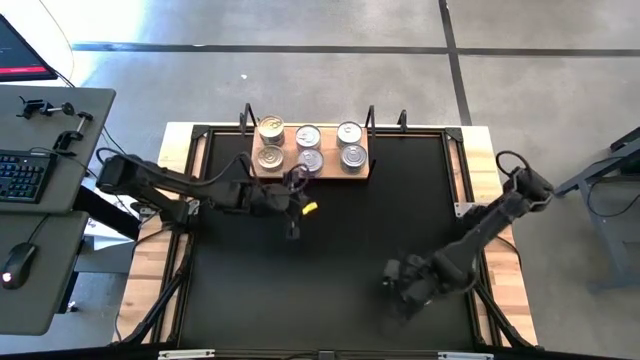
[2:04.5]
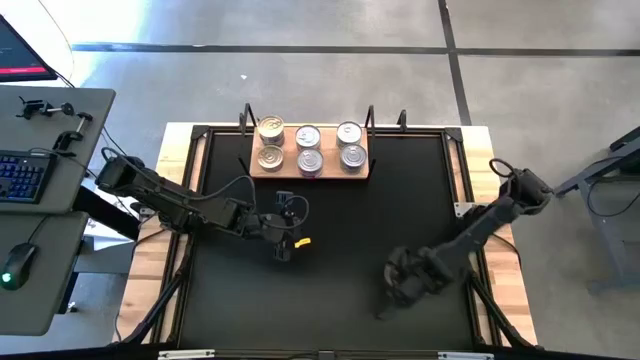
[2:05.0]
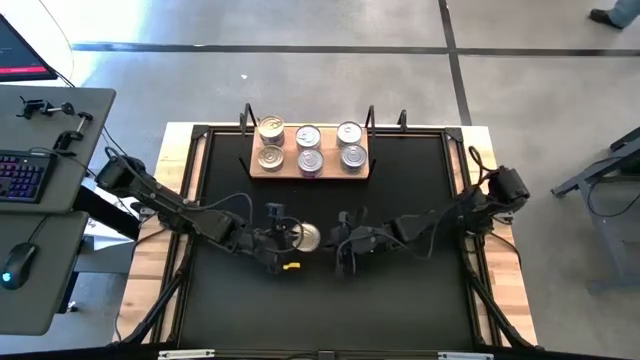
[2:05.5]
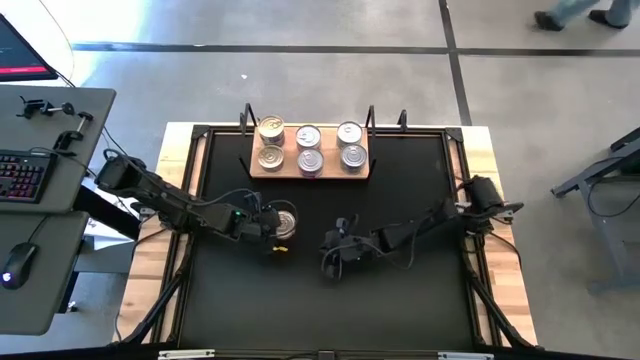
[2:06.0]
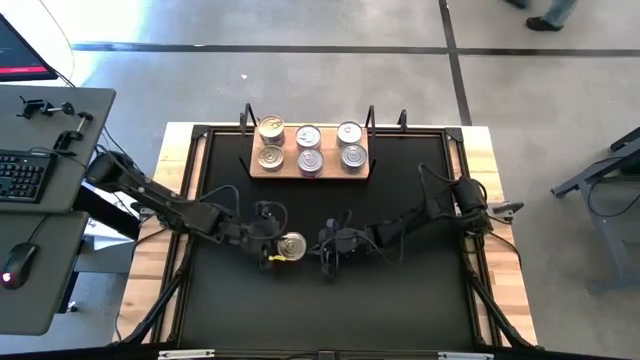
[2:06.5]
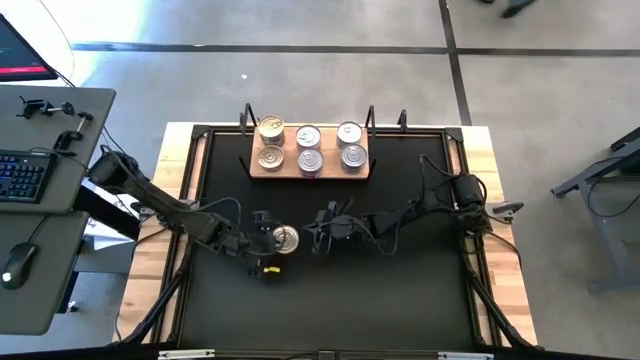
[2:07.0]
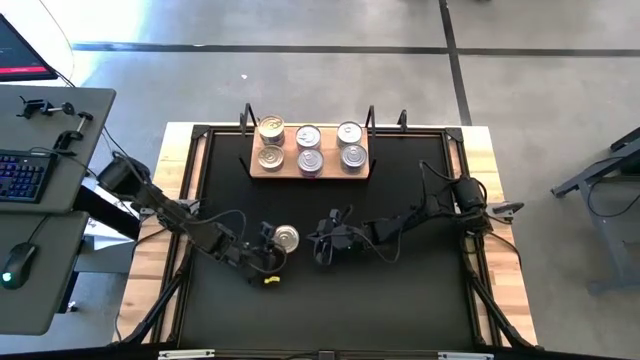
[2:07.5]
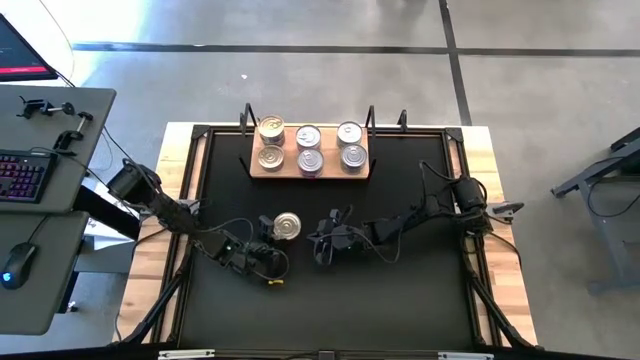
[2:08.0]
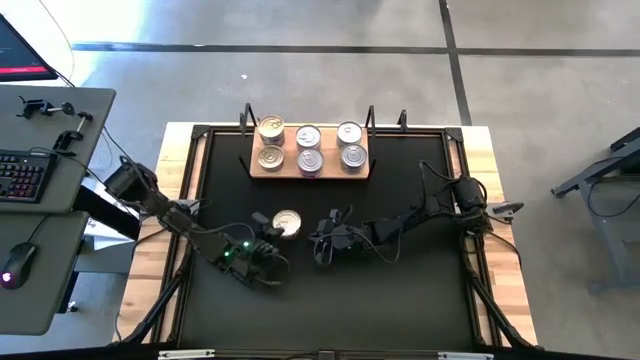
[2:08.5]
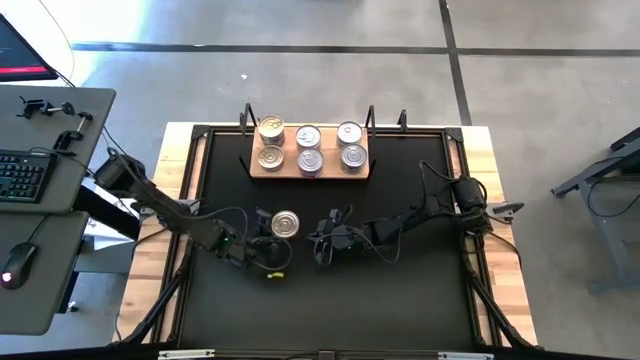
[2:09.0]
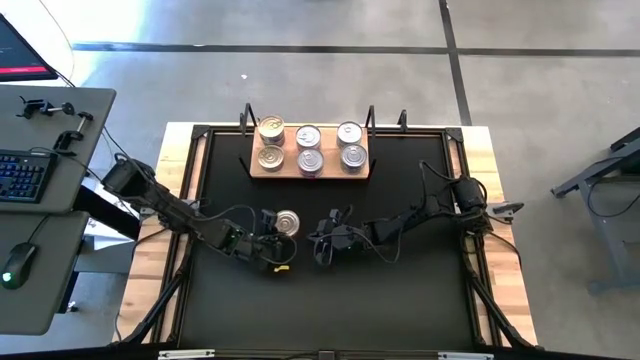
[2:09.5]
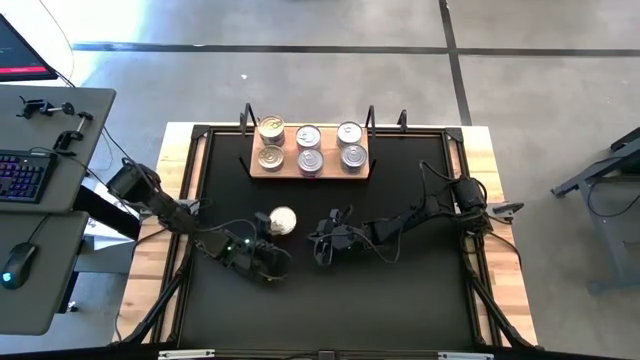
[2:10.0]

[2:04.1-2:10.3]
Task: Stack canned seafood by type on shelf
Stack the blue tuna can on top of the other blue tuna can on the shelf

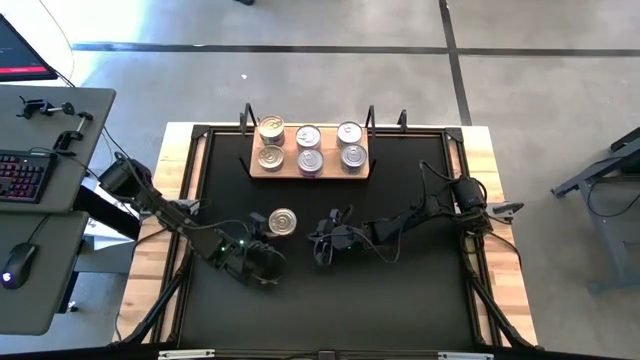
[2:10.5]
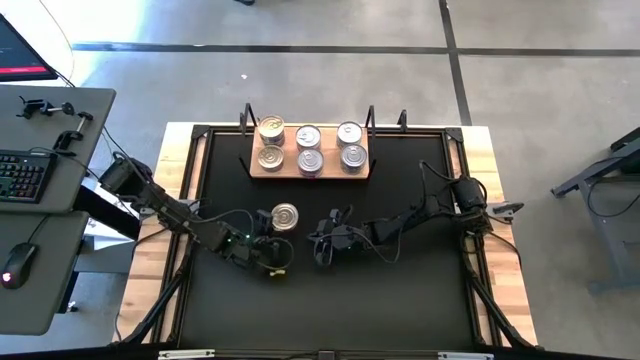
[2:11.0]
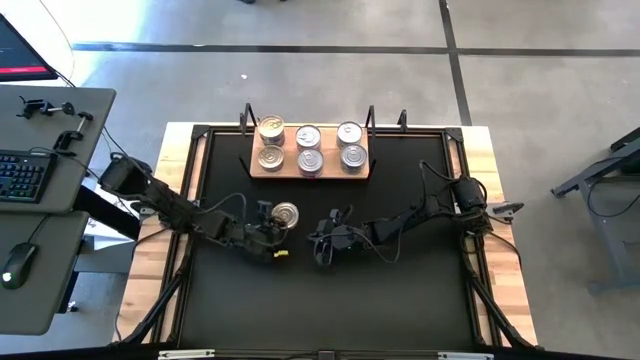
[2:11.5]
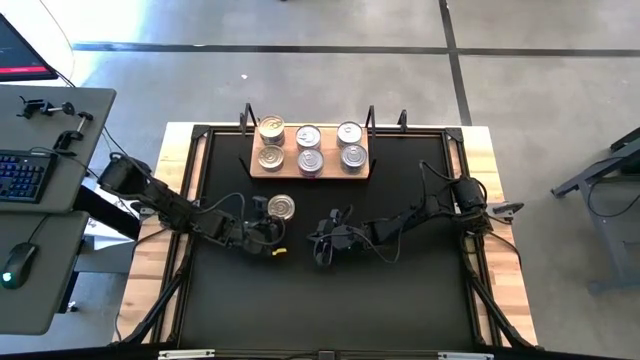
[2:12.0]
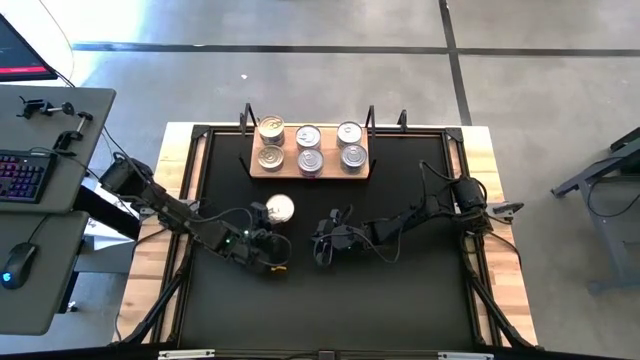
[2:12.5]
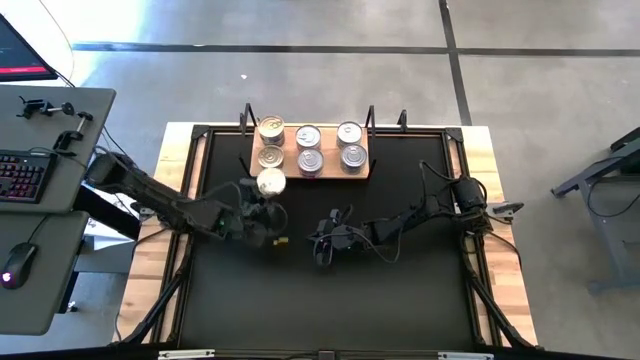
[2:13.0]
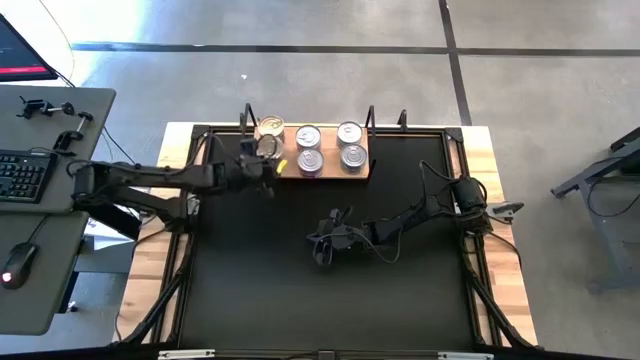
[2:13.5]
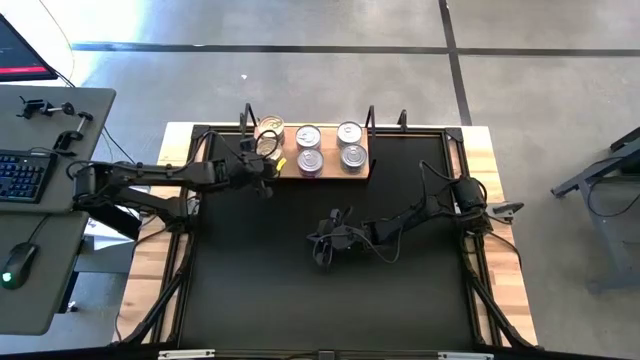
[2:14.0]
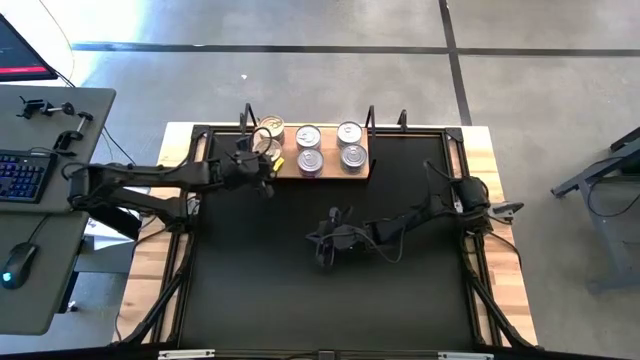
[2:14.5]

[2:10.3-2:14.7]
Stack the blue tuna can on top of the other blue tuna can on the shelf

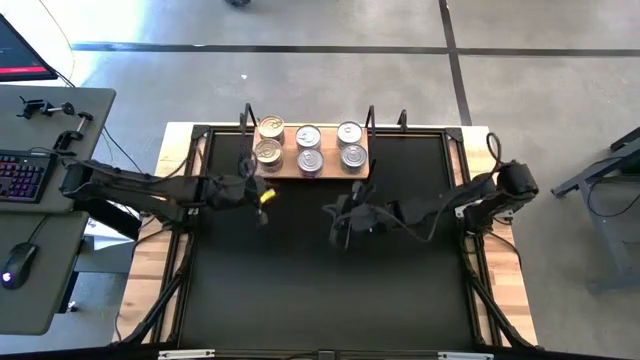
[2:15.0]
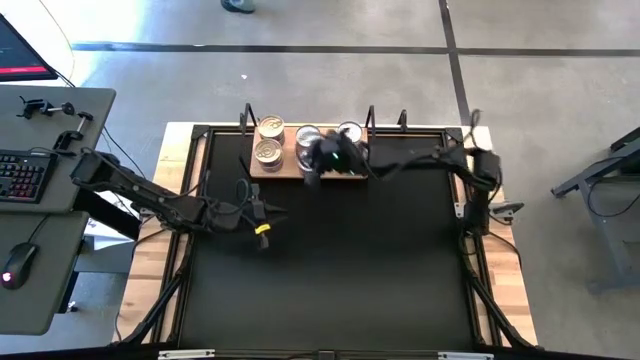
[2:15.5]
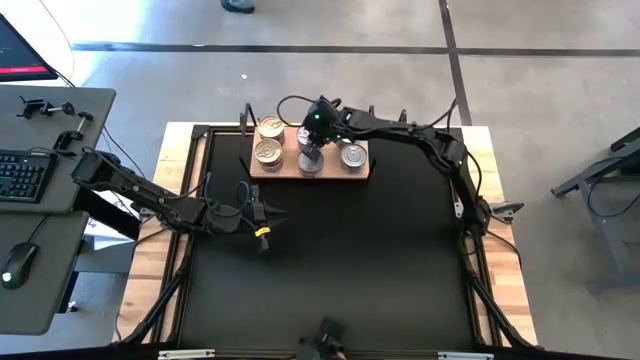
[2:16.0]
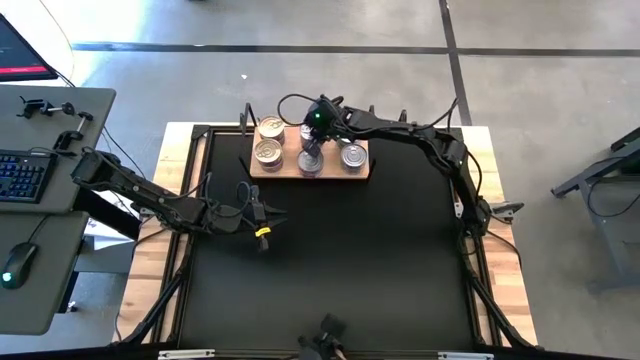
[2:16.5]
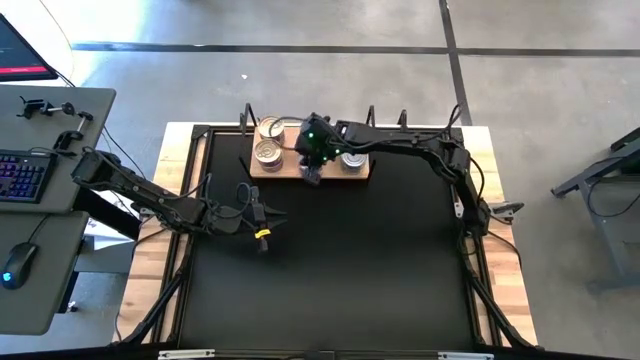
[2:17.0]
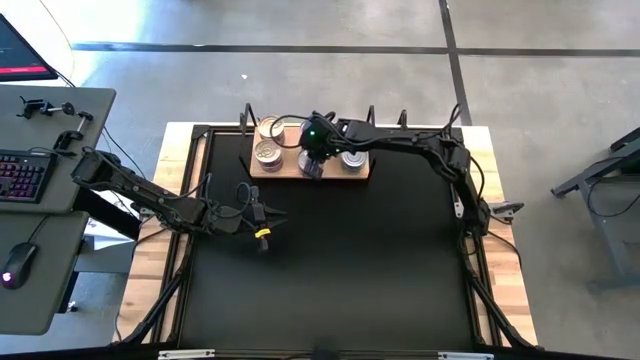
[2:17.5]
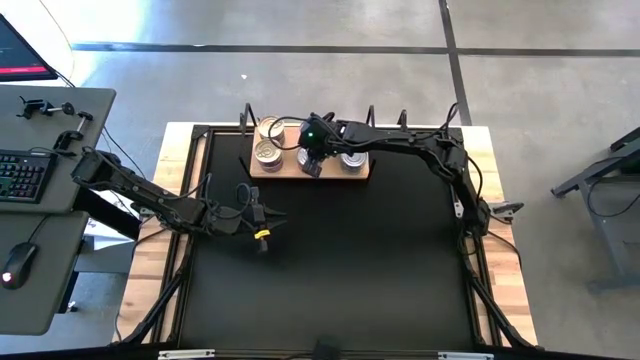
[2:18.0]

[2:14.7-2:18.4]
Adjust the red tuna cans on the shelf

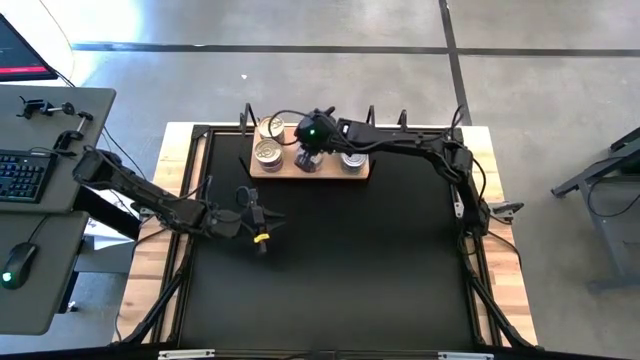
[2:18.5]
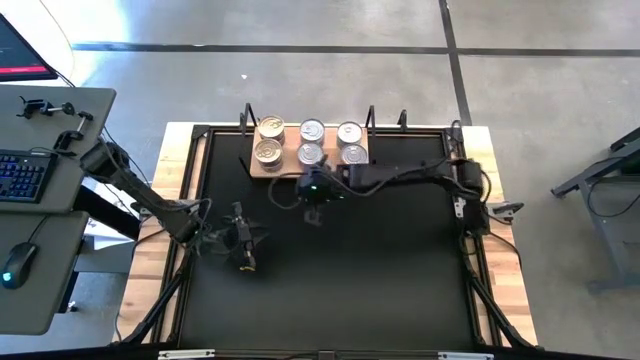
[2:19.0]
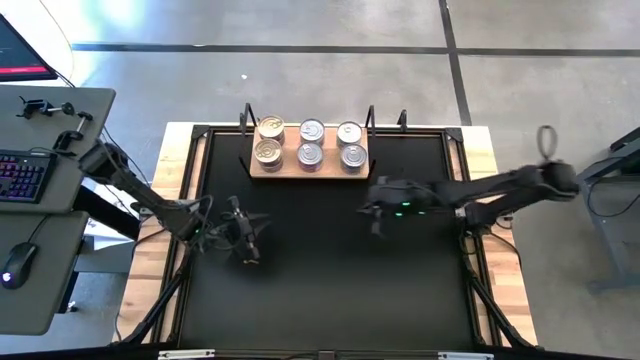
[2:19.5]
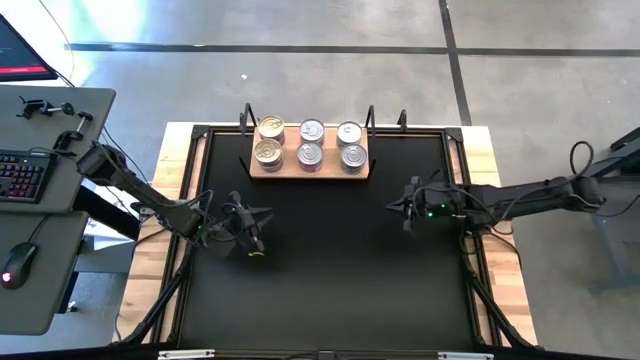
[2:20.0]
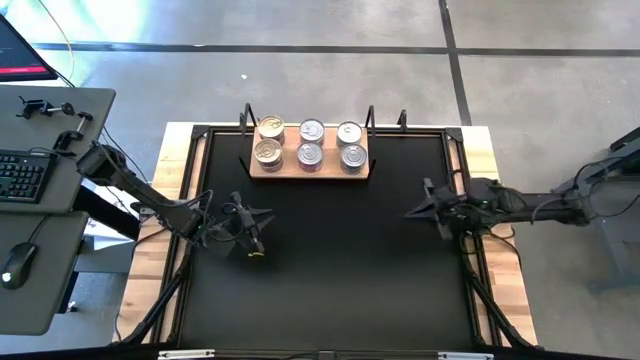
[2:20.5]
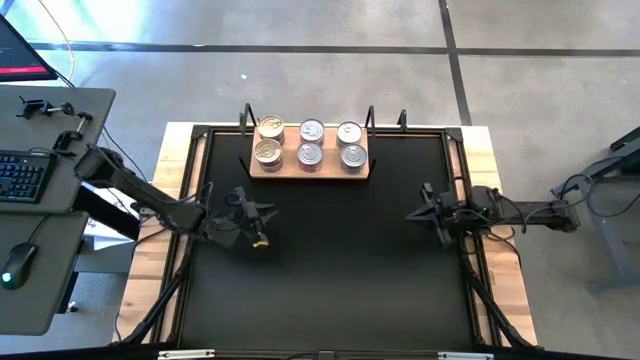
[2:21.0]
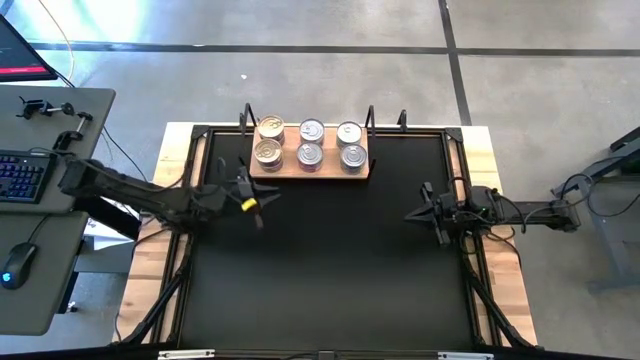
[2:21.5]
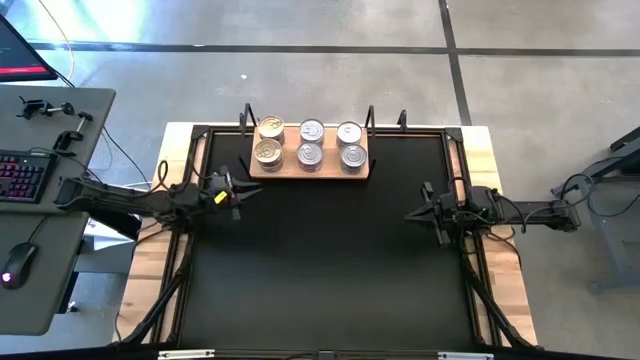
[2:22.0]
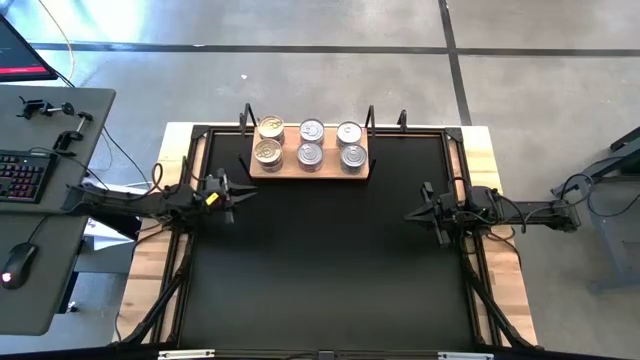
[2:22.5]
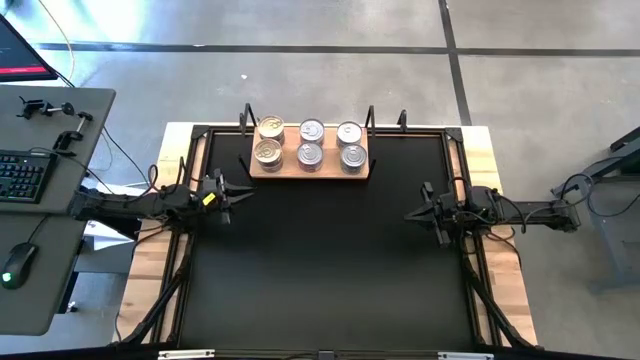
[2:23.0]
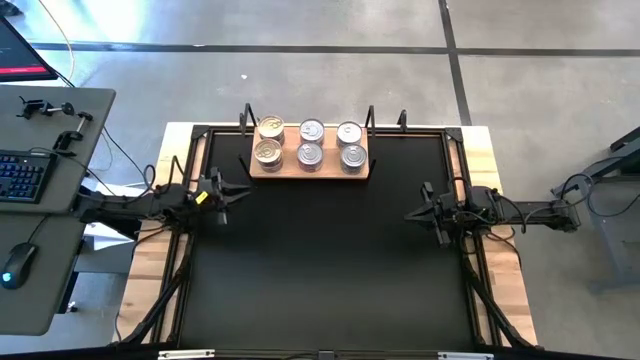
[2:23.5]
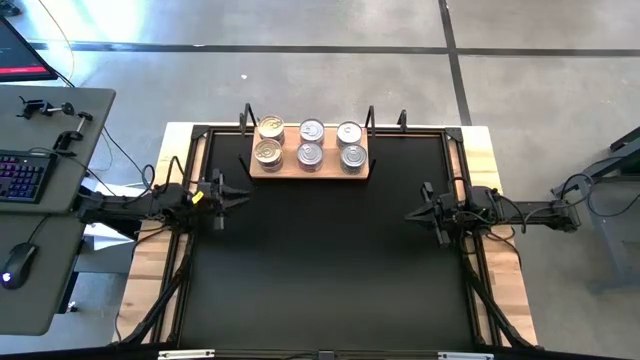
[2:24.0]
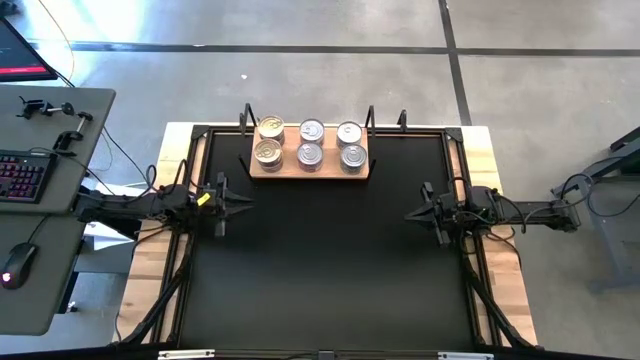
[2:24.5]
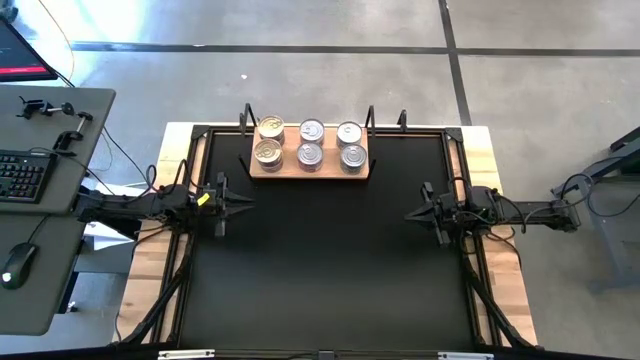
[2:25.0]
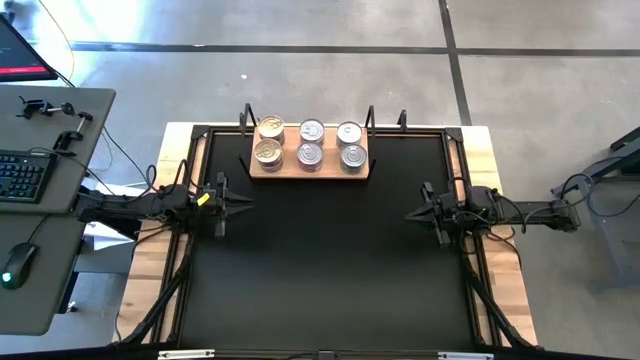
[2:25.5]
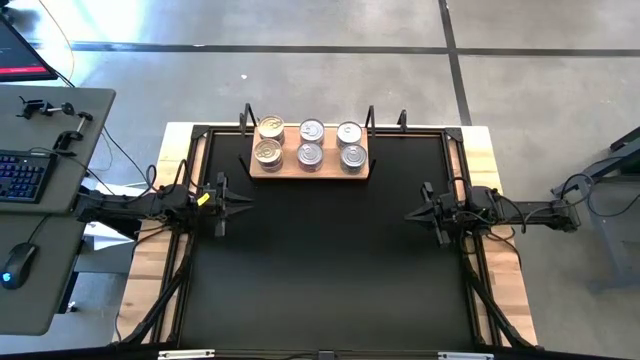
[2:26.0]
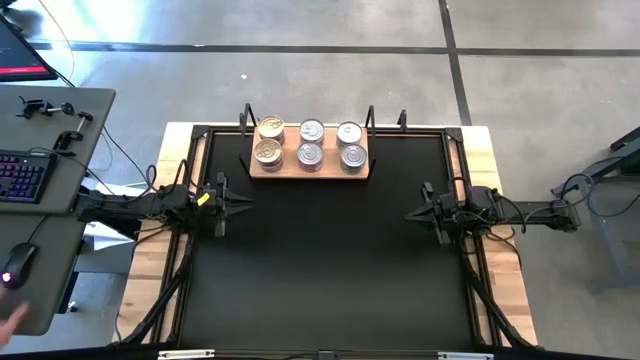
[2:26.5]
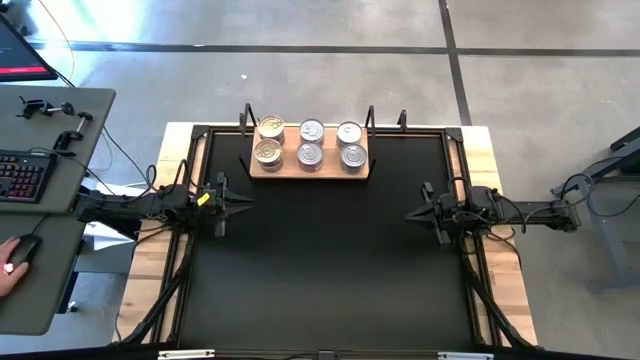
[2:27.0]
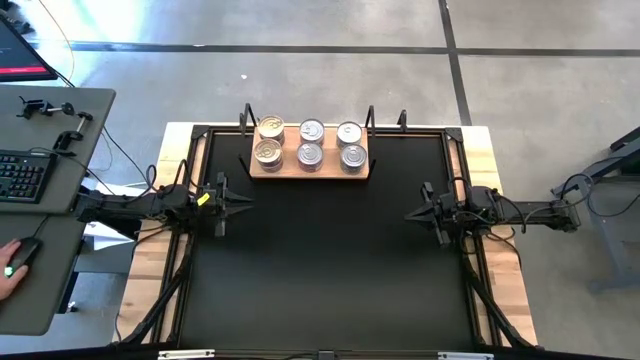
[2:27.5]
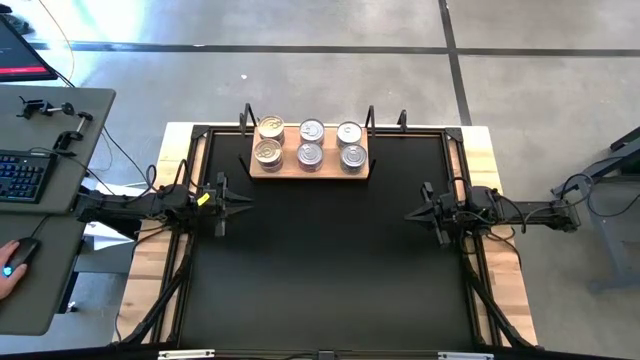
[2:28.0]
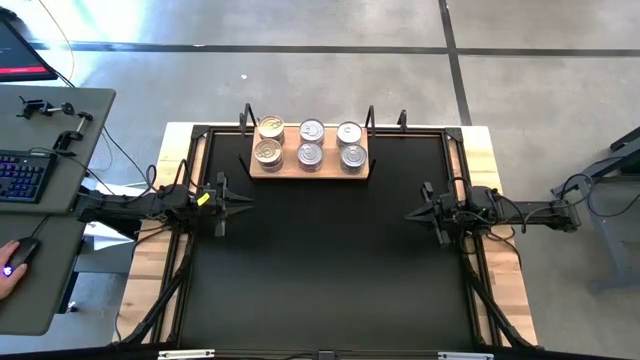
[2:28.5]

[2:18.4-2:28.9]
Return to Home Position
